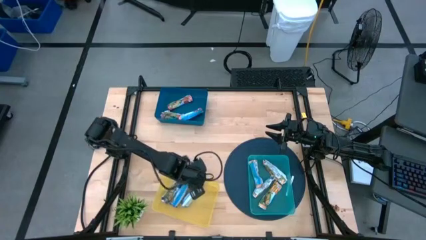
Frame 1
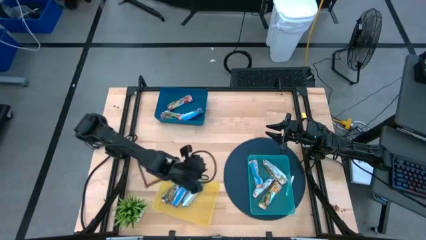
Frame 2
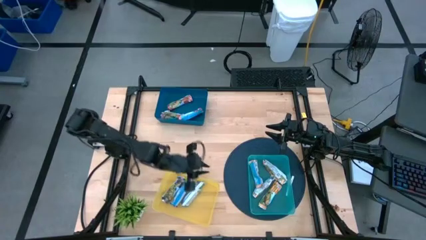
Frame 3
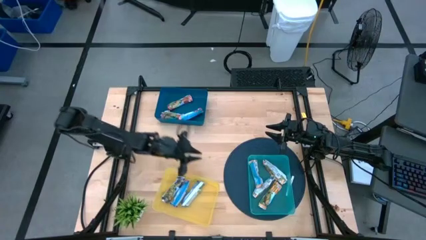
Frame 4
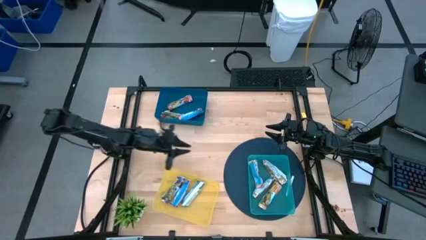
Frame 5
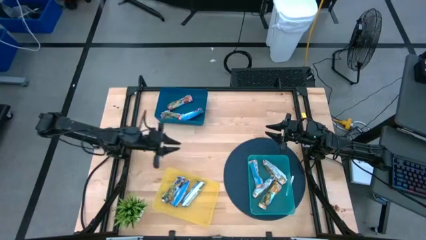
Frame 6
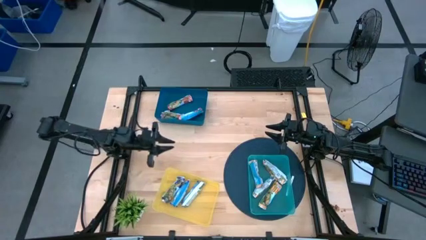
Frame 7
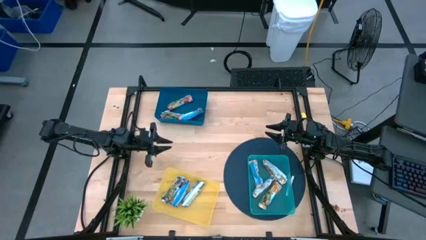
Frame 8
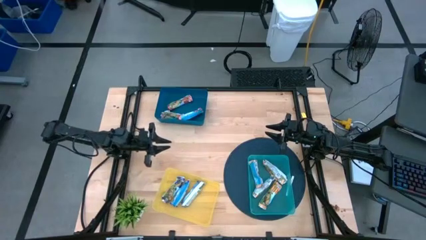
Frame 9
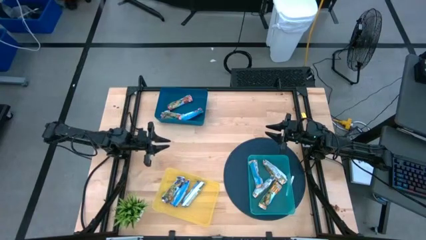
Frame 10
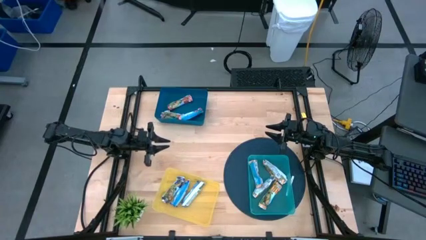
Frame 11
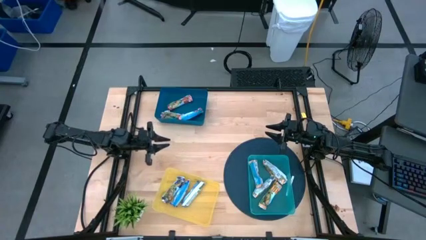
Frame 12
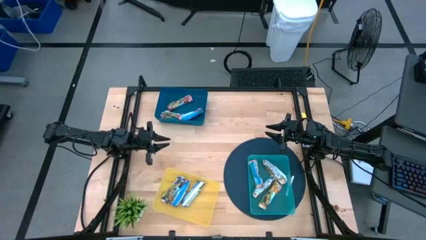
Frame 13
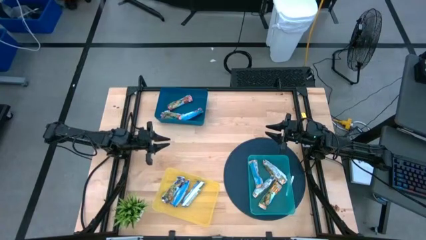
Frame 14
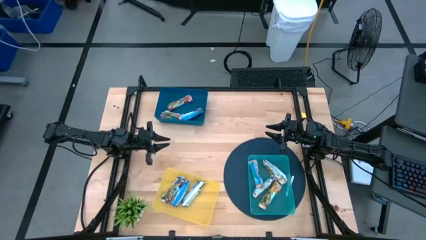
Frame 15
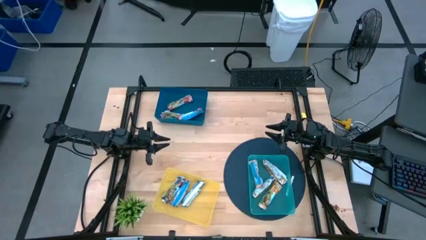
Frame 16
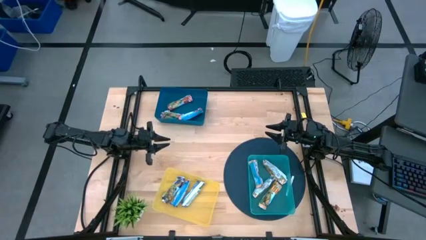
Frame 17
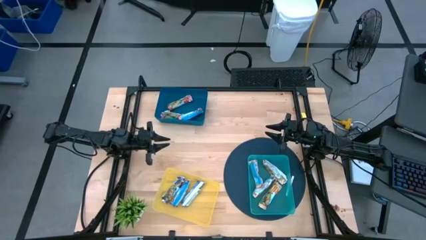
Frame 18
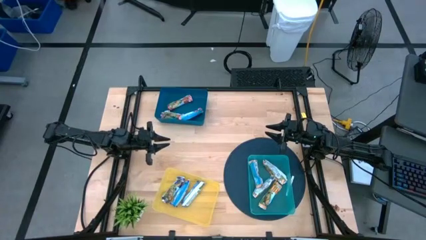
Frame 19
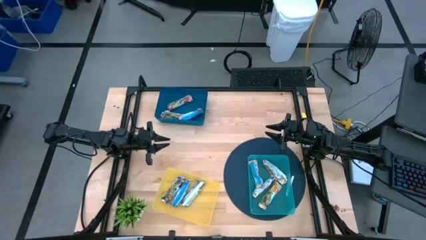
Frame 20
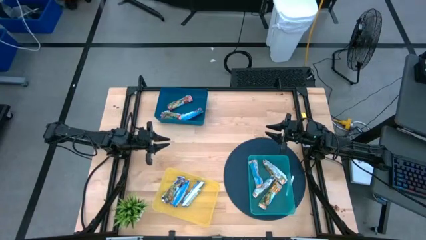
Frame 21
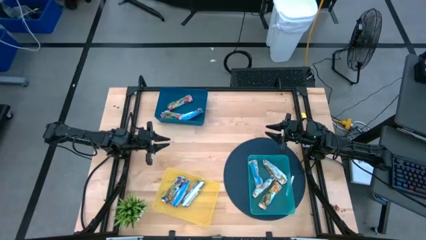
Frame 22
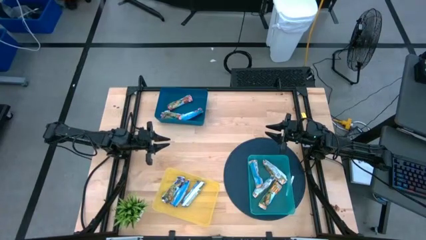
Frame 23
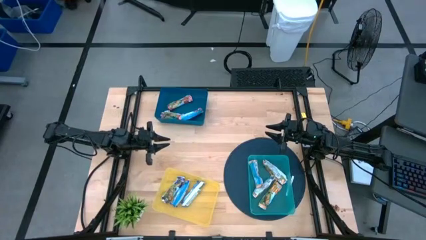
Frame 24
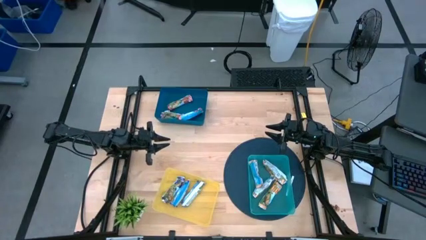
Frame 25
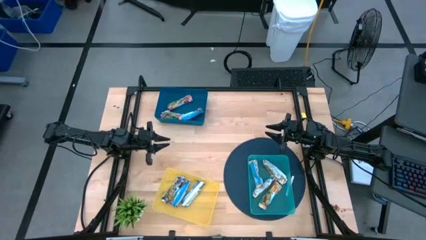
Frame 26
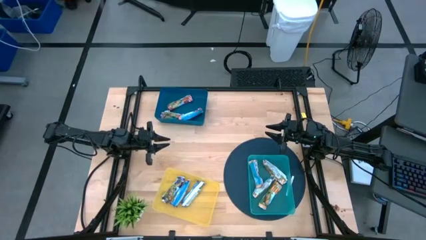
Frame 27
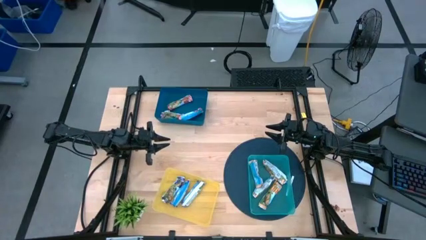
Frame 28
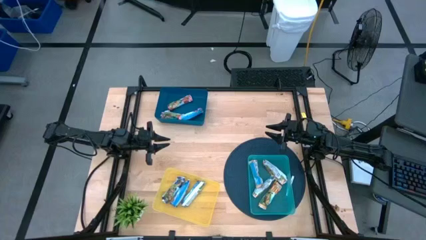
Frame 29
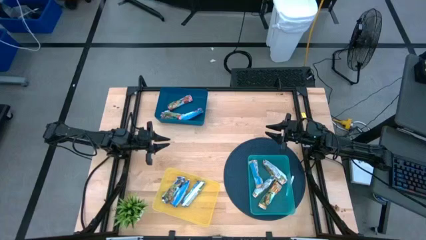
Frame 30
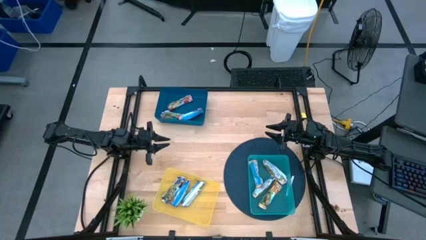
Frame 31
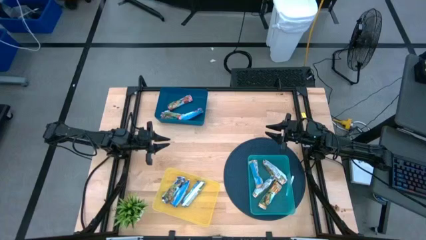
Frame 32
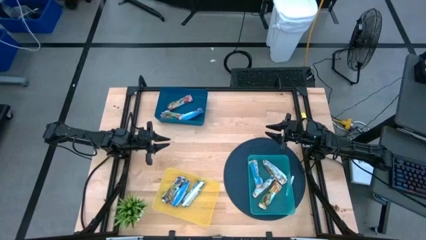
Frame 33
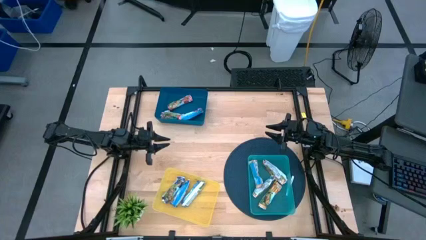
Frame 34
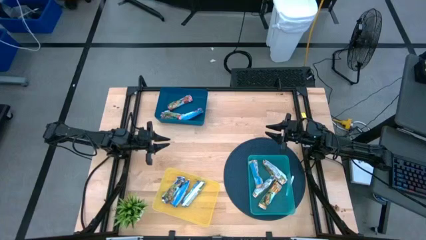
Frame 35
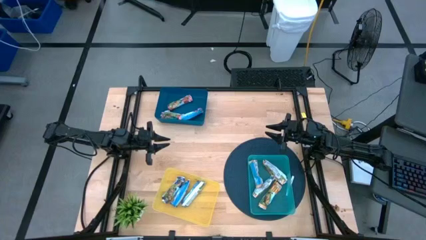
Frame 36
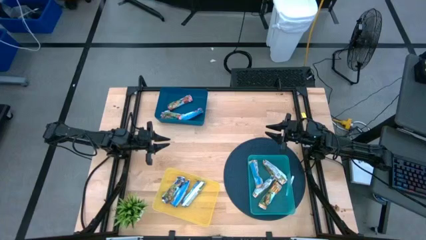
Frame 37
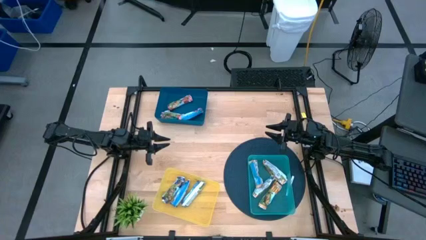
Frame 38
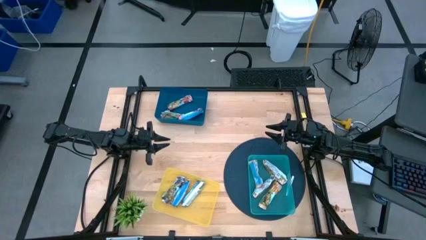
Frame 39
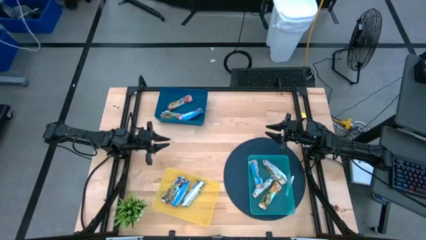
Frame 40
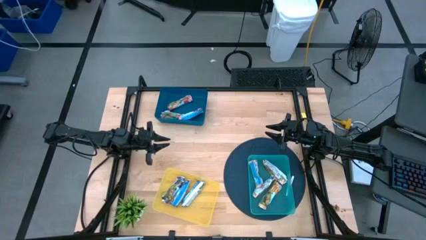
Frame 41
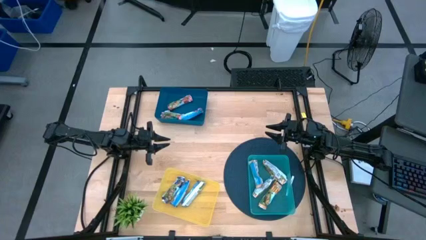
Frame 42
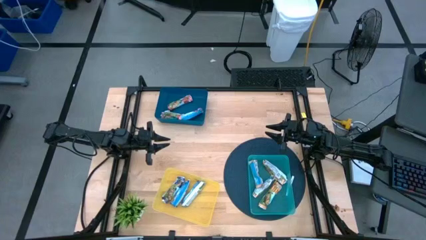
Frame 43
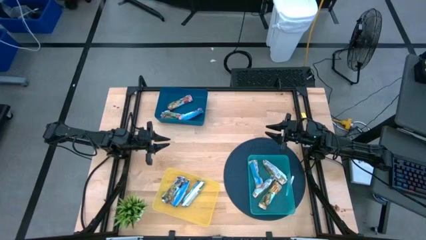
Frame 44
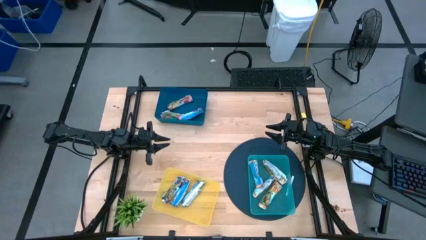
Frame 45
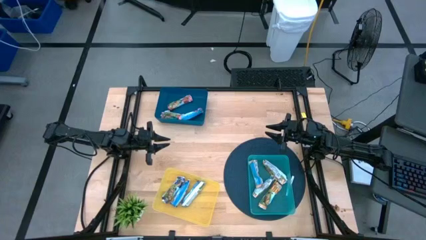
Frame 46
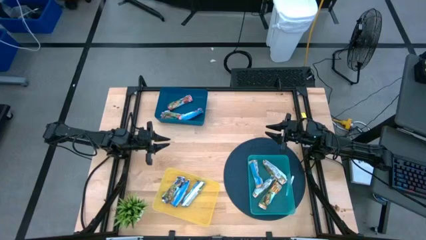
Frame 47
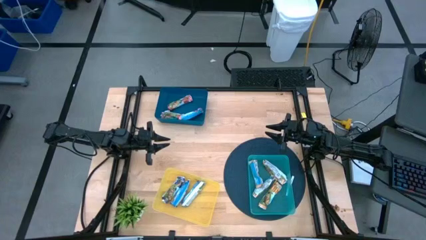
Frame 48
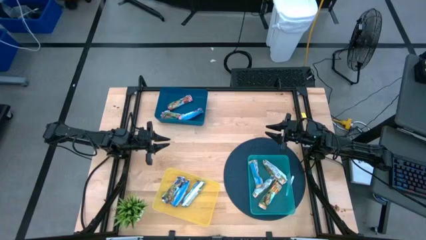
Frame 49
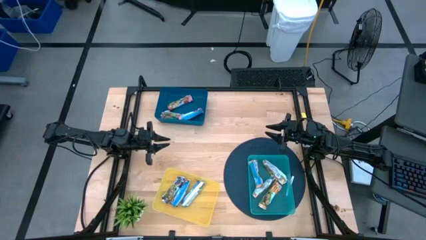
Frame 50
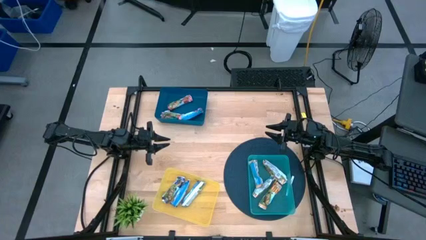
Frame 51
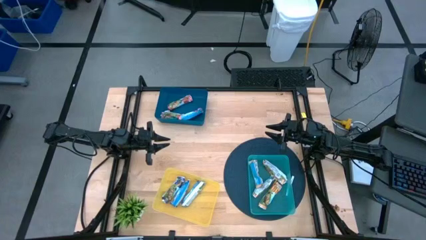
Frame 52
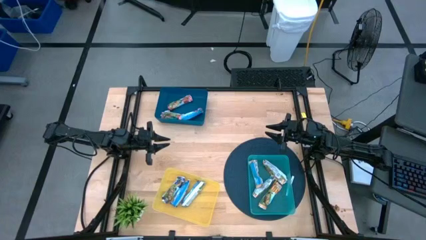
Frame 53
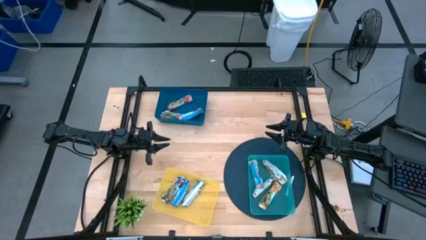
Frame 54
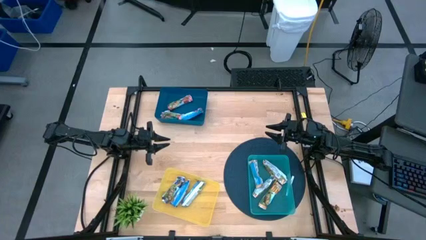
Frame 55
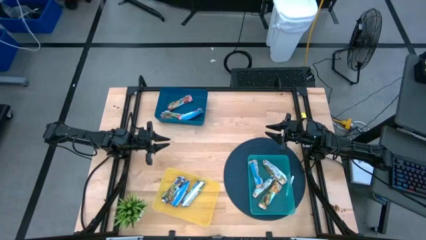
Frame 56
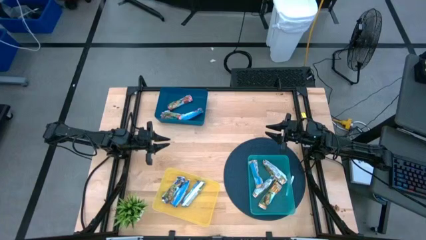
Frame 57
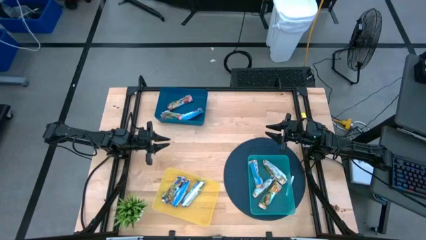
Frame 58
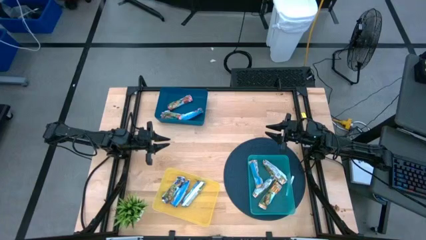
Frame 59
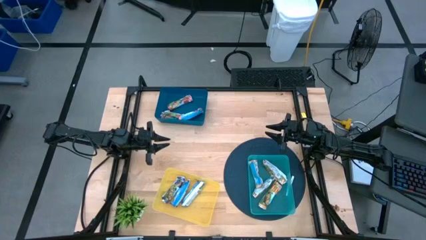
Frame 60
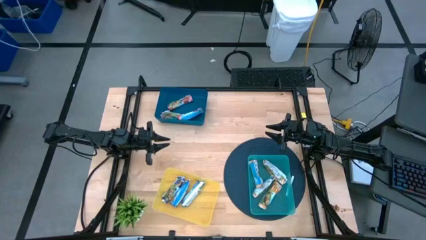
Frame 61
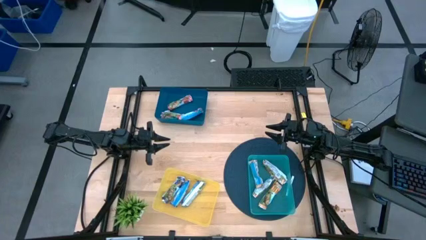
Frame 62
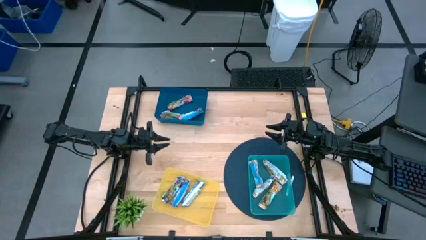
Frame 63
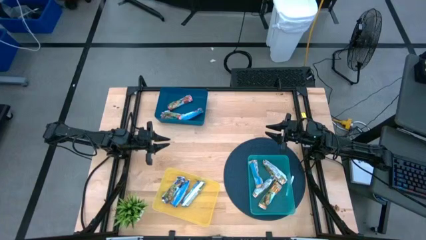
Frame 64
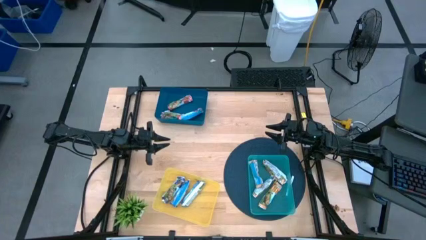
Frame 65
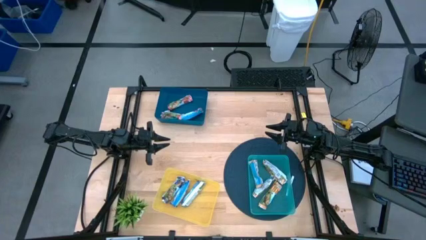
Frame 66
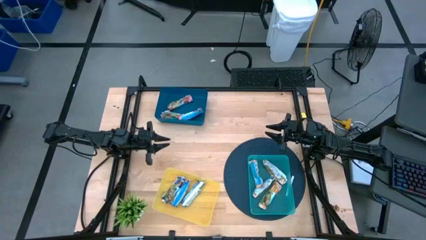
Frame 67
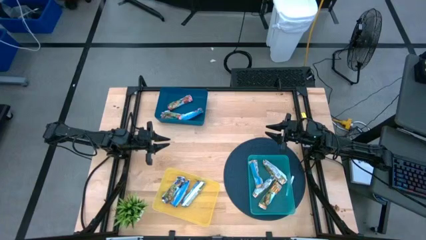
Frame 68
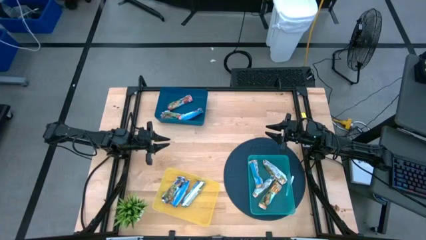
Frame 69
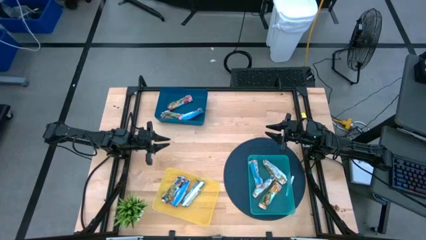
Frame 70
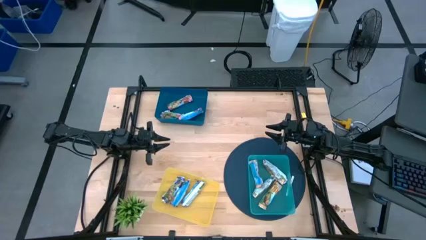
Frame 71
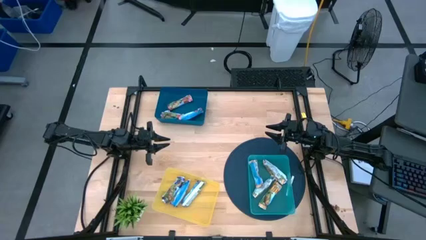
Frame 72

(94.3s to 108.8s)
Task: Pick and place Granola Bars by type
Return to Home Position
